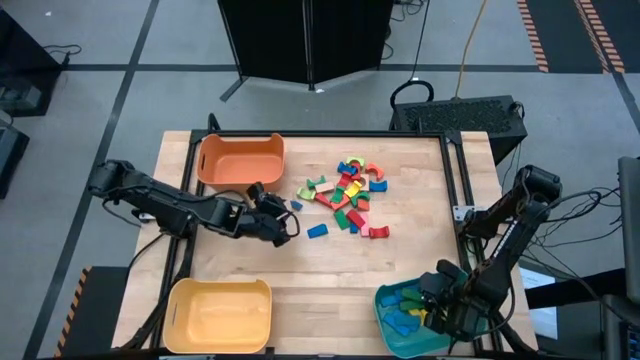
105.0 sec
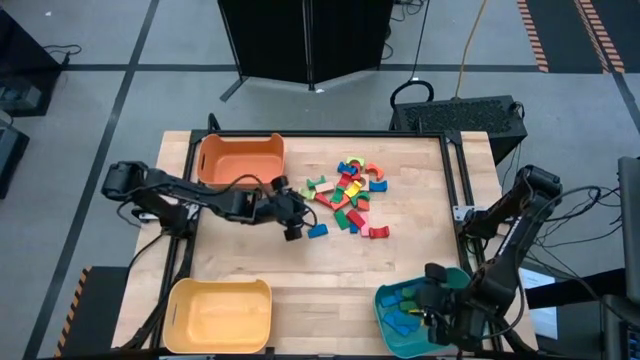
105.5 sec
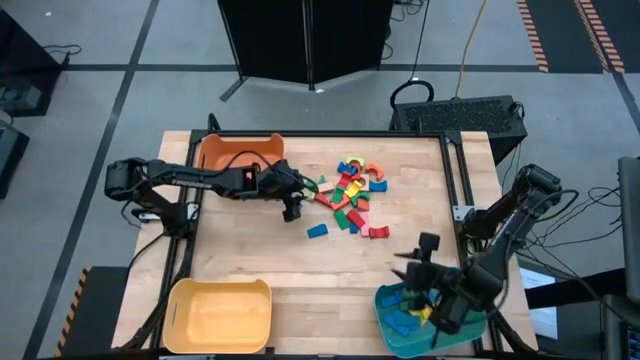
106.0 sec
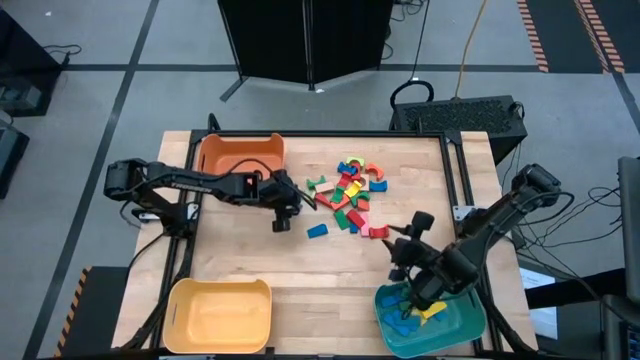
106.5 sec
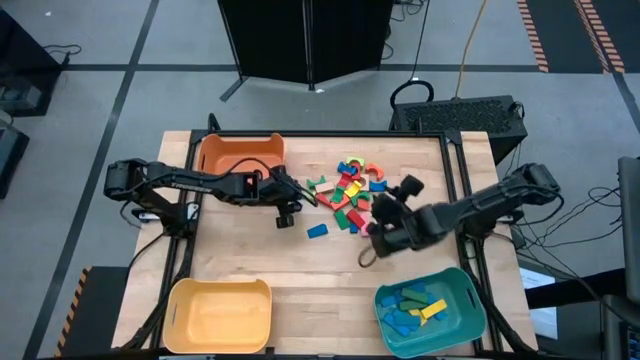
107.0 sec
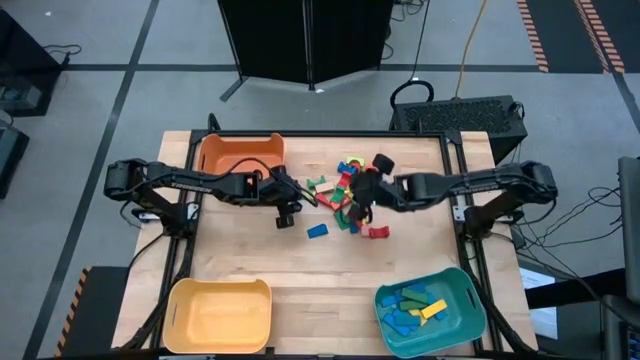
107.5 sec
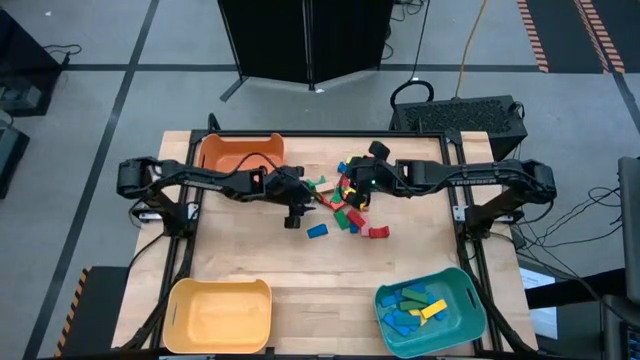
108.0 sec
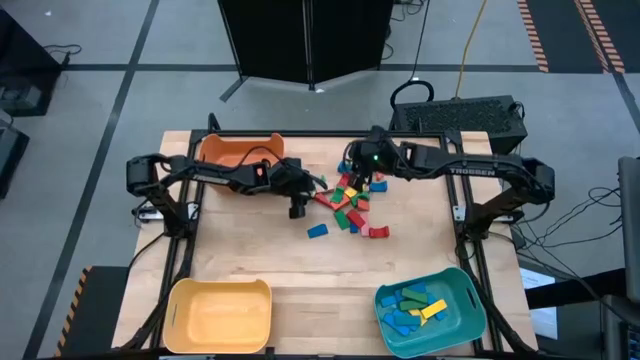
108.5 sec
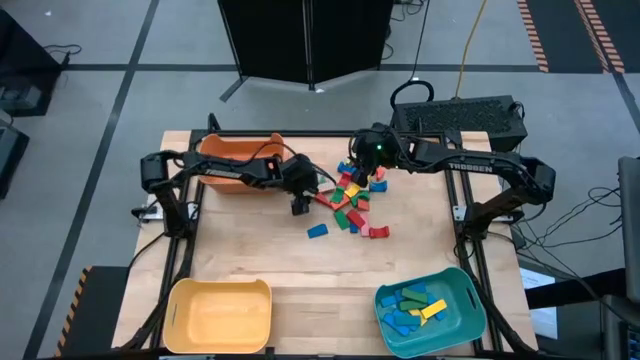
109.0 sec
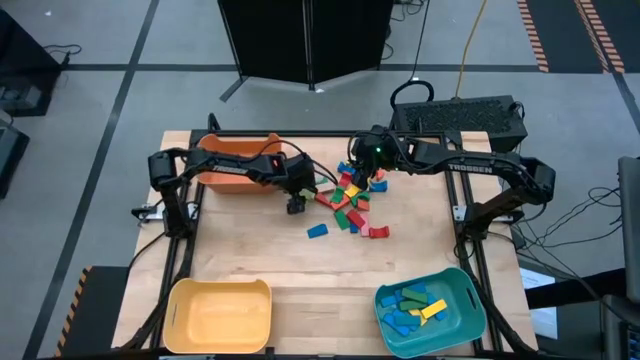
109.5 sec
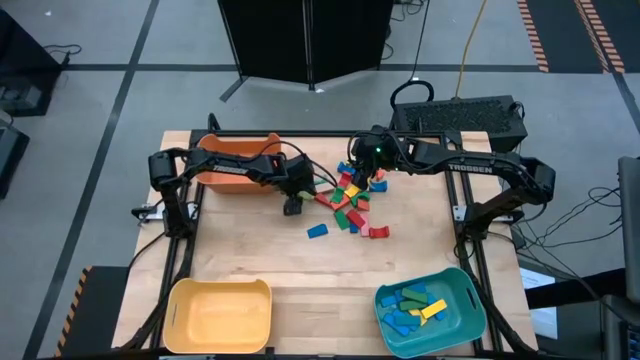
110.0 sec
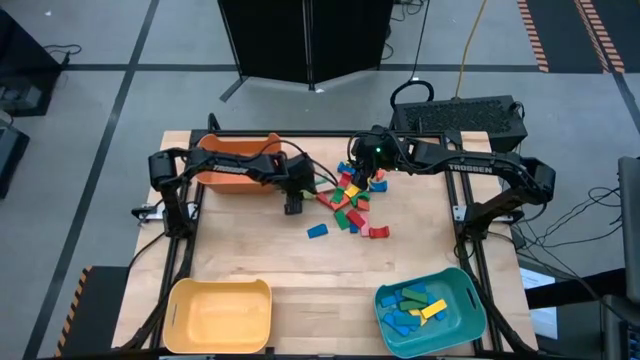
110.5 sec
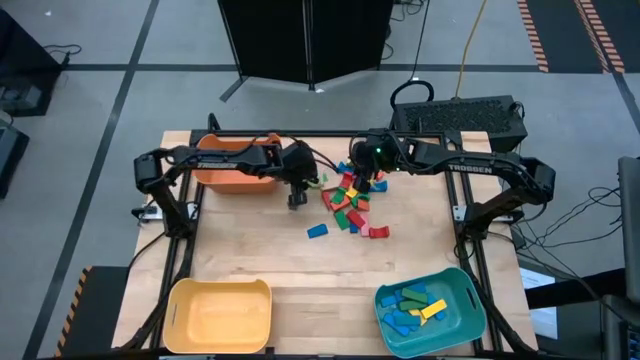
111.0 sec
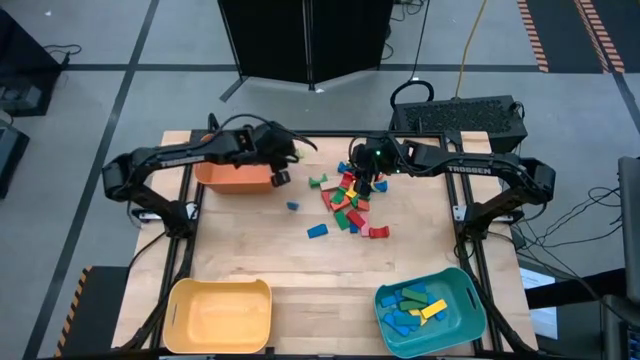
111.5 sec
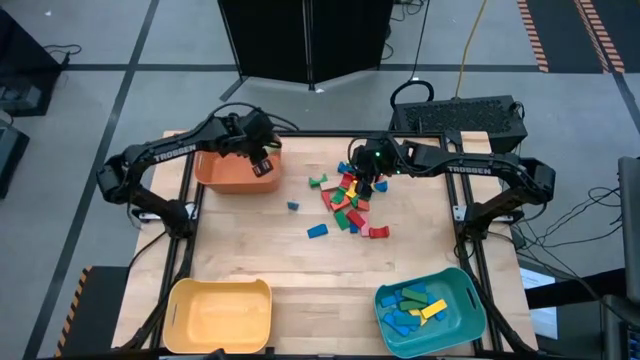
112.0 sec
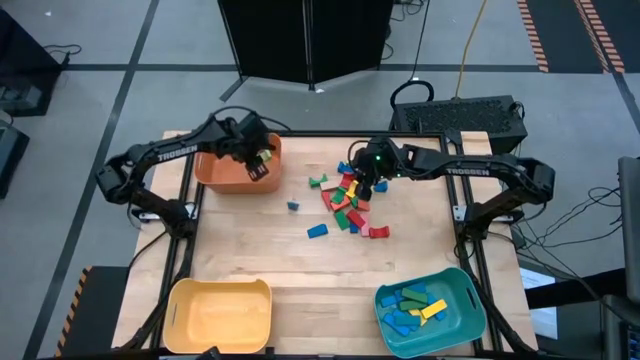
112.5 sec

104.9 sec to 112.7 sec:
Task: Sort blocks by size
Put the light green arch block into the orange bin

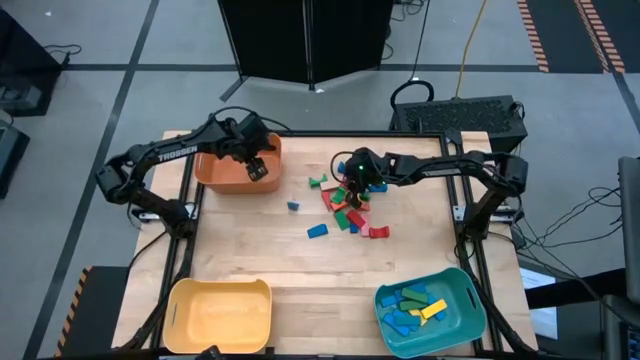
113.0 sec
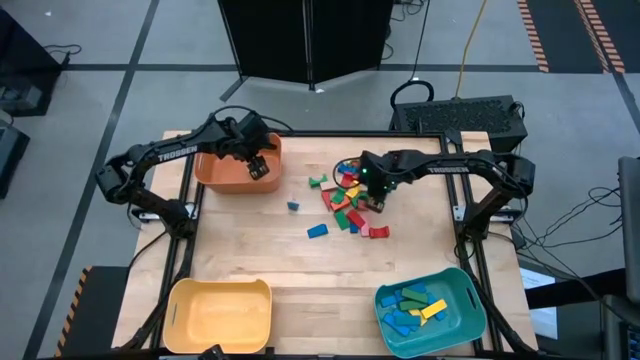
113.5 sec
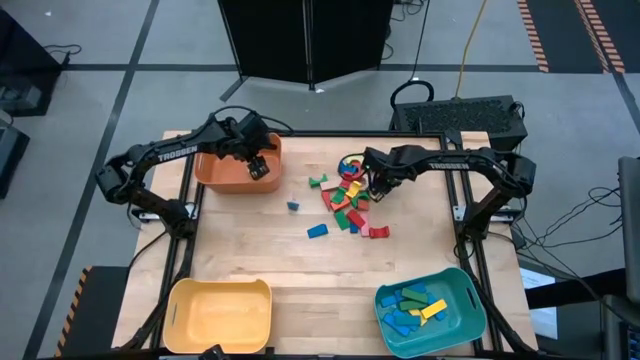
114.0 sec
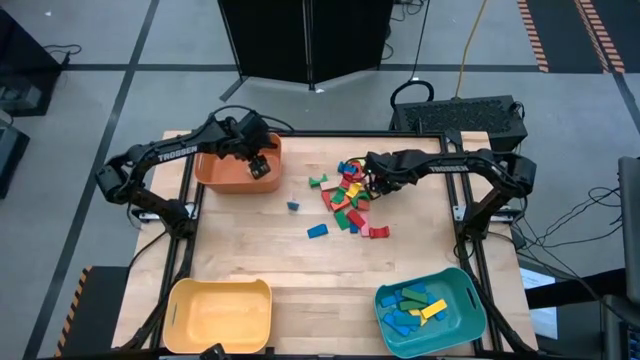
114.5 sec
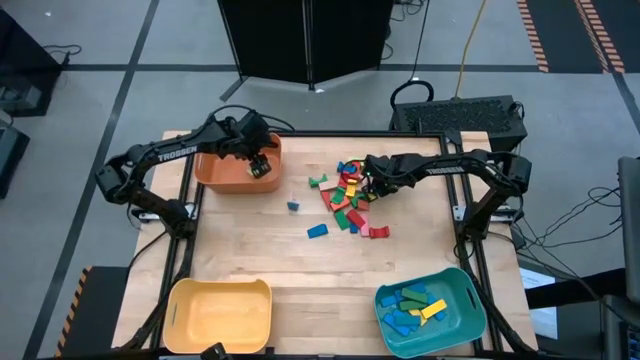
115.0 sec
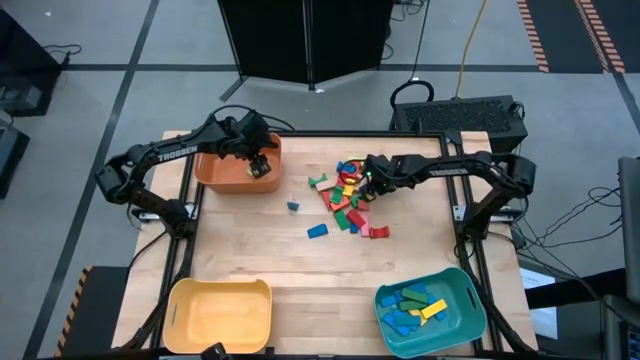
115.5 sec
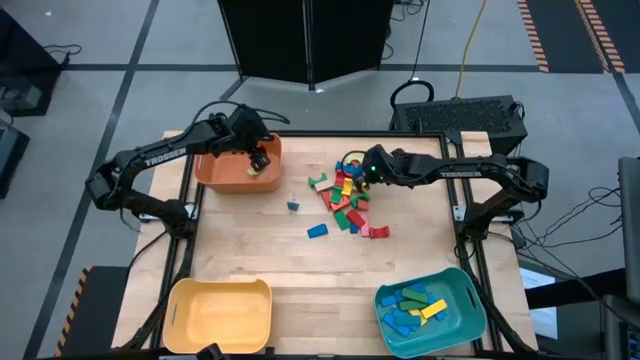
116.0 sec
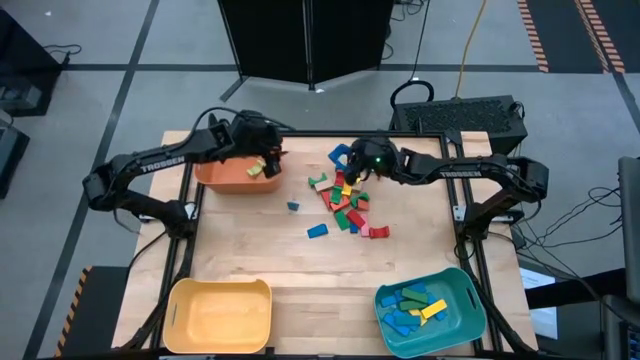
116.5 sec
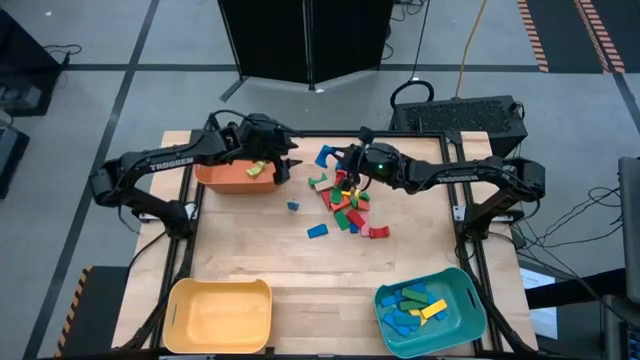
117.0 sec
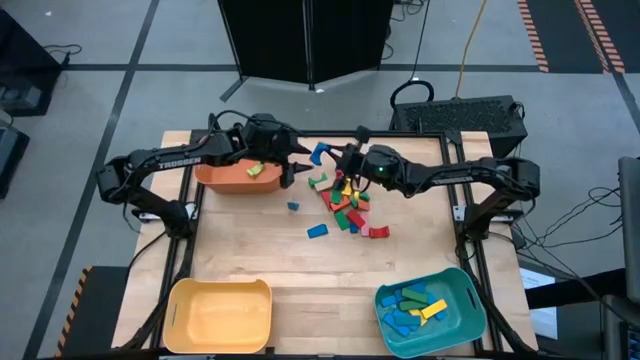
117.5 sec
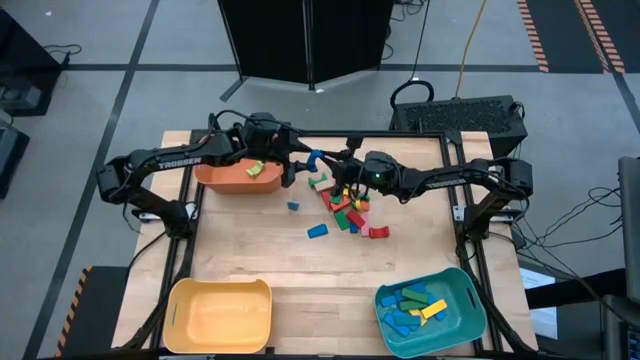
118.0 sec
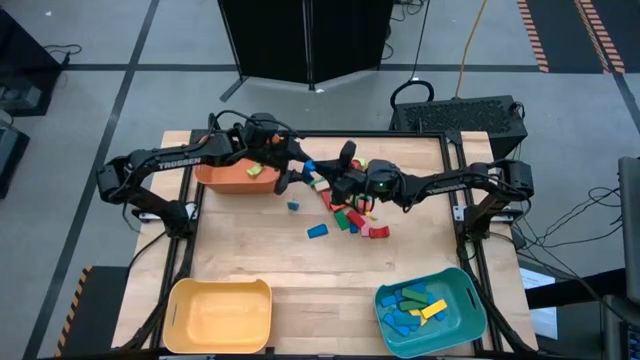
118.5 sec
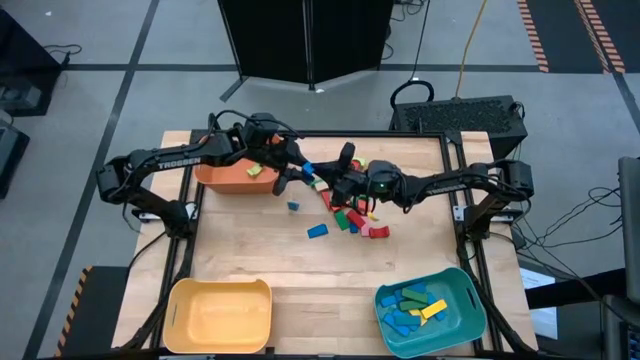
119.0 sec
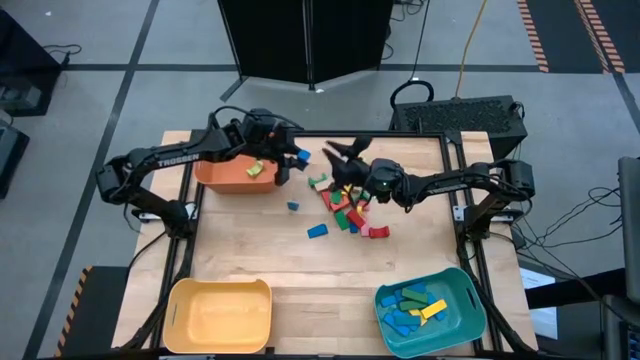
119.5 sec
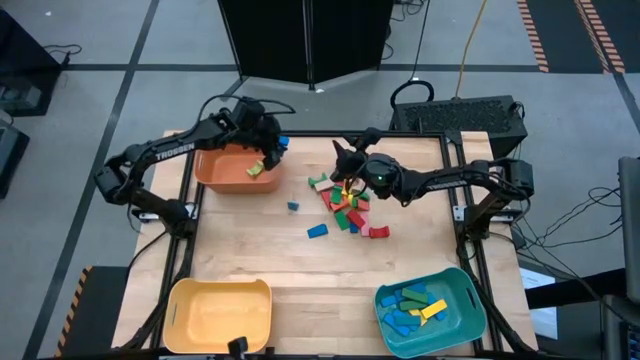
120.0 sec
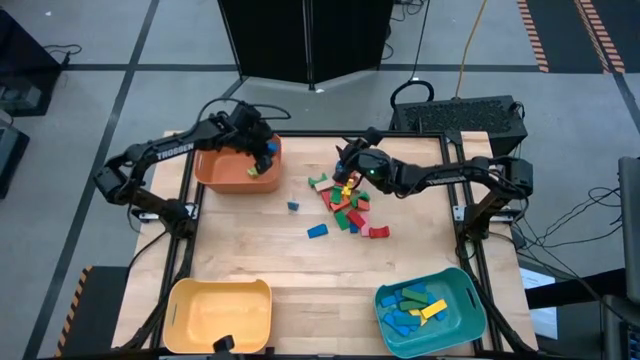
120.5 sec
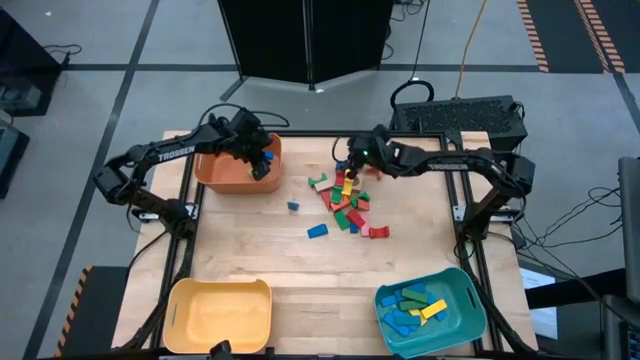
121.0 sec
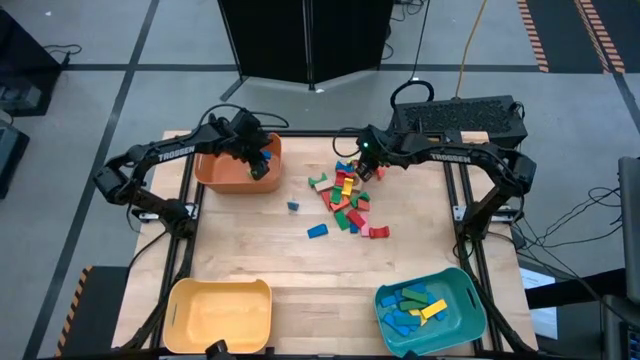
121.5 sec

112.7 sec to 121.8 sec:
Put the blue arch block into the orange bin

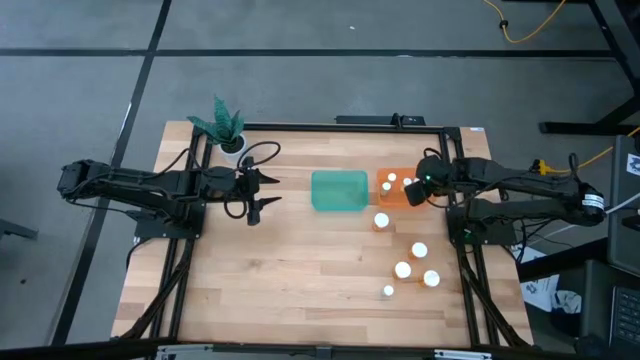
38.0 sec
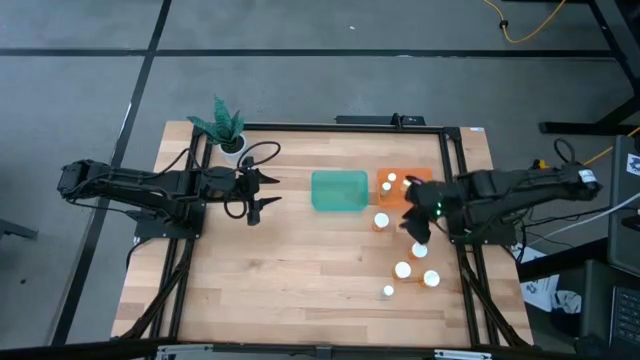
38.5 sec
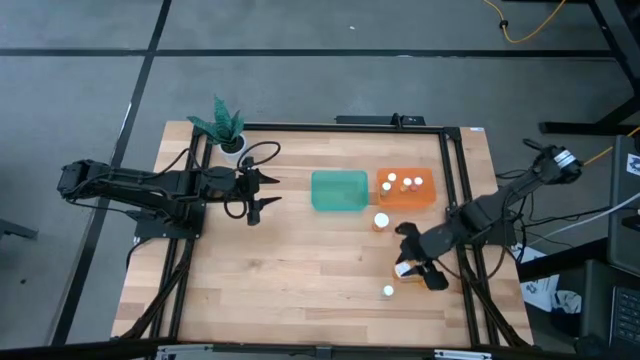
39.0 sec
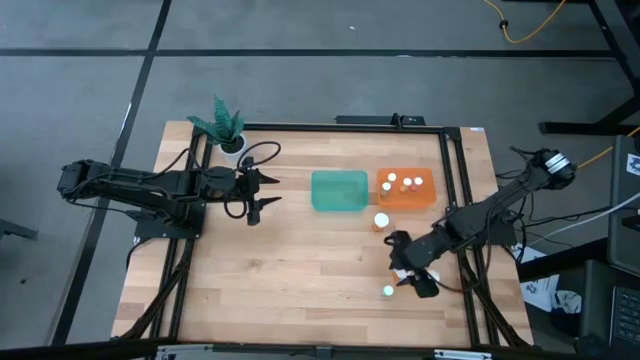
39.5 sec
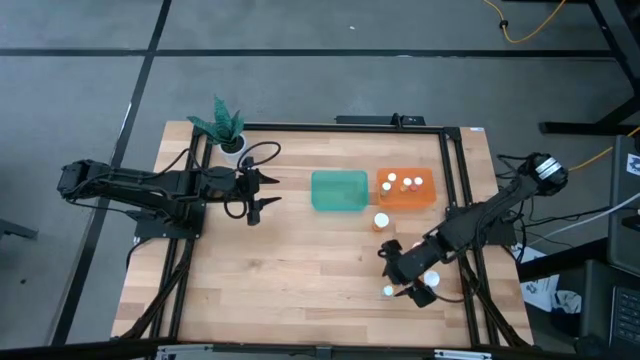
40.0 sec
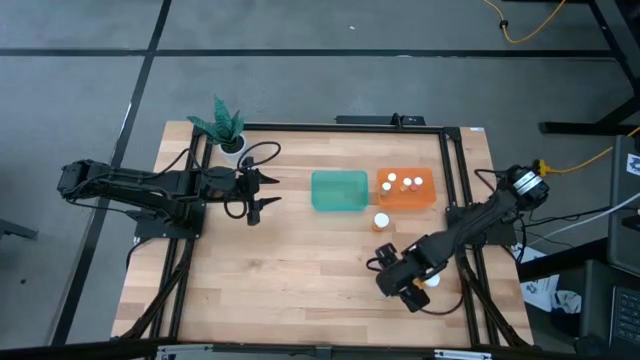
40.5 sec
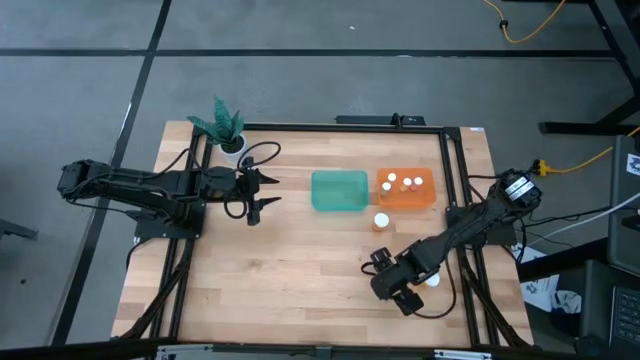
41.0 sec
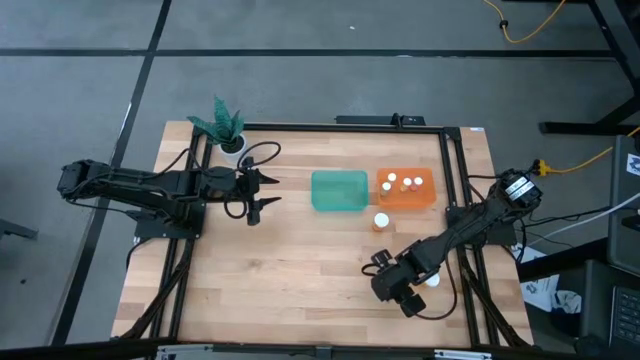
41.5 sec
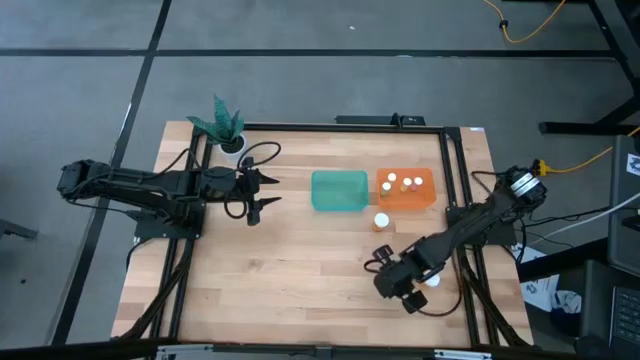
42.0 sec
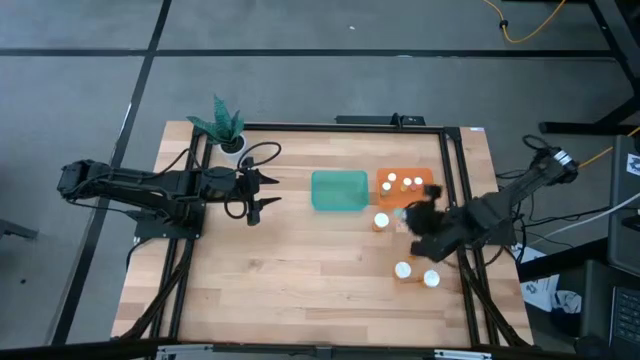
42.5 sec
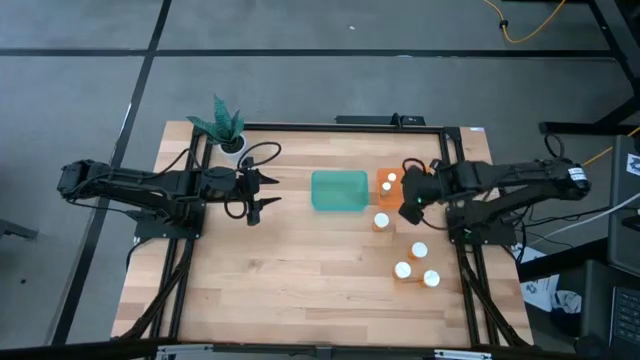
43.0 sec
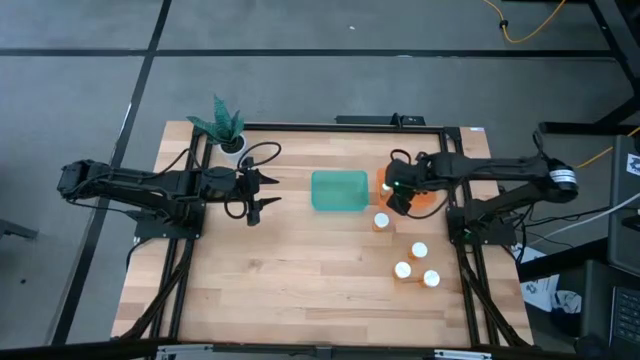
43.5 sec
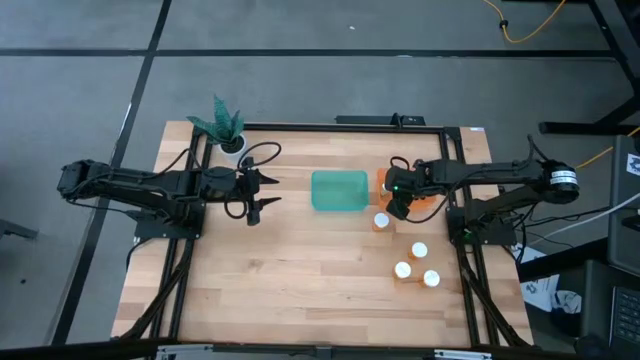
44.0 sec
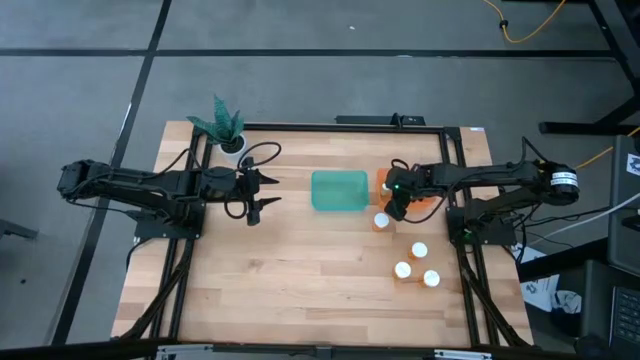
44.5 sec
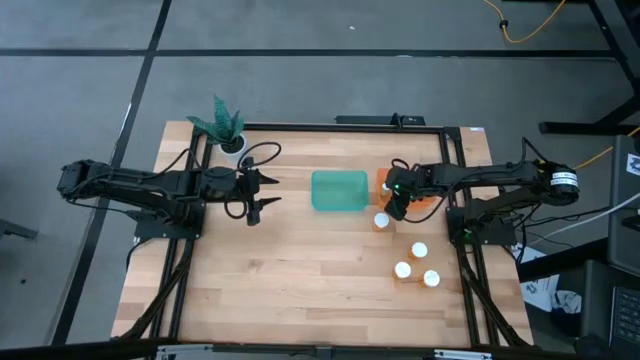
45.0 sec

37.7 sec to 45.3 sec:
Task: Pick and place medicine bottles into bin by pill shape (circle, oval)
Put the blue pill bottle into the orange bin
